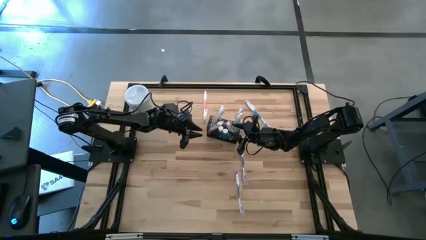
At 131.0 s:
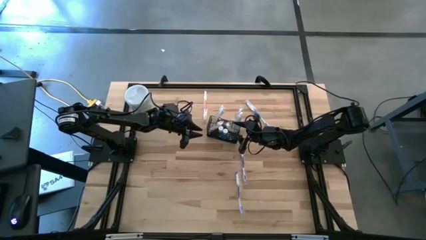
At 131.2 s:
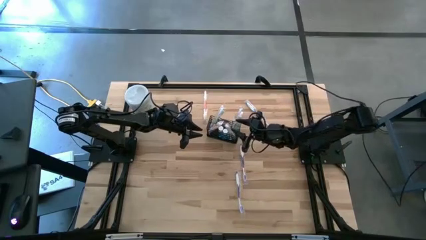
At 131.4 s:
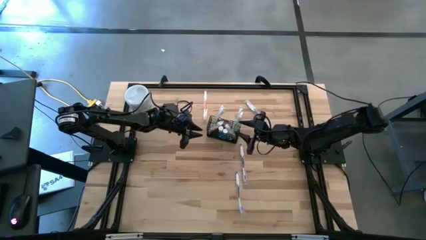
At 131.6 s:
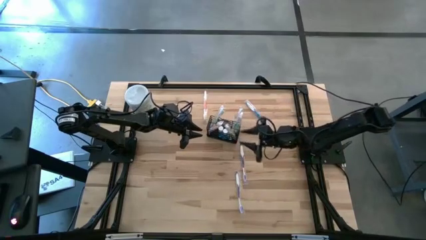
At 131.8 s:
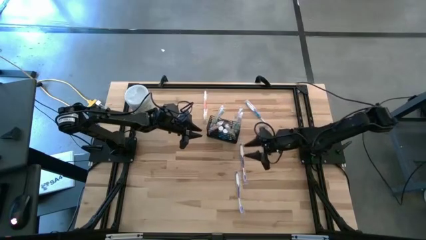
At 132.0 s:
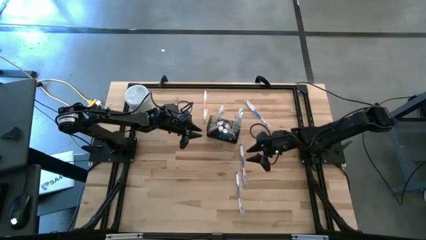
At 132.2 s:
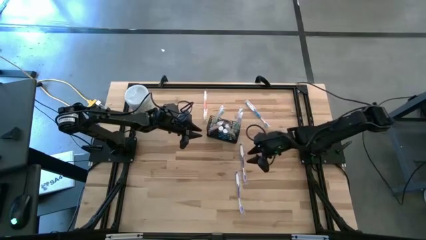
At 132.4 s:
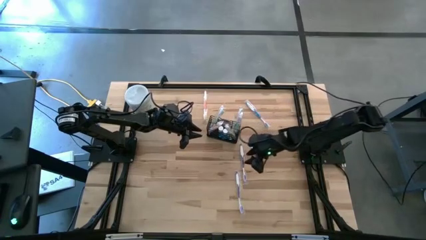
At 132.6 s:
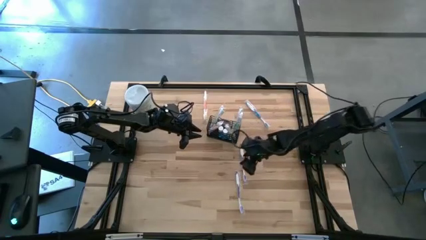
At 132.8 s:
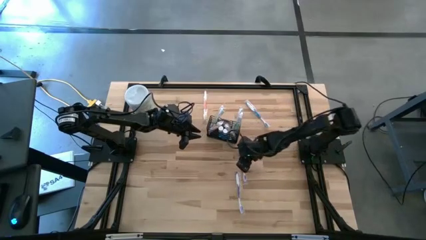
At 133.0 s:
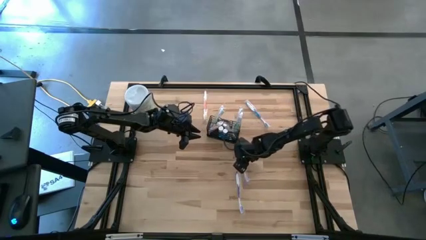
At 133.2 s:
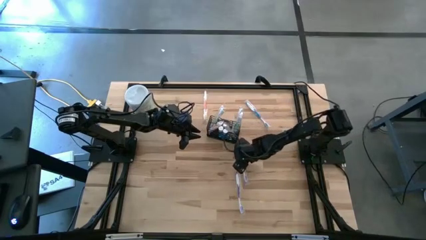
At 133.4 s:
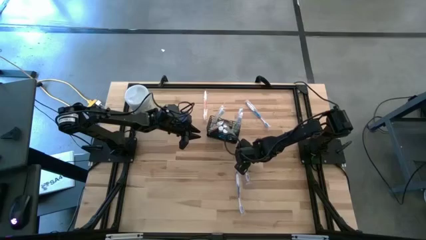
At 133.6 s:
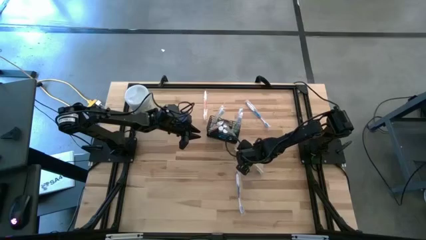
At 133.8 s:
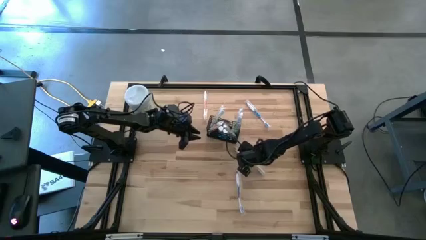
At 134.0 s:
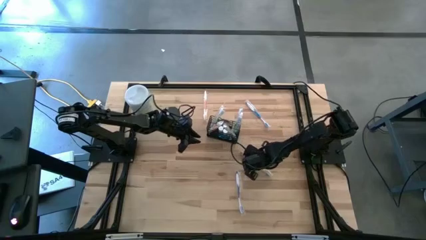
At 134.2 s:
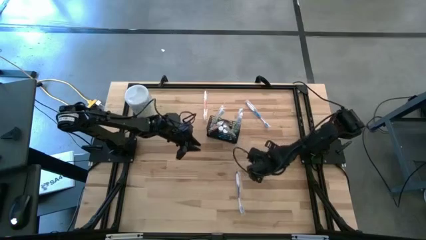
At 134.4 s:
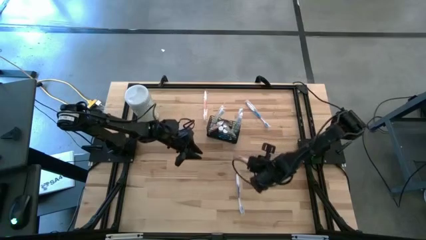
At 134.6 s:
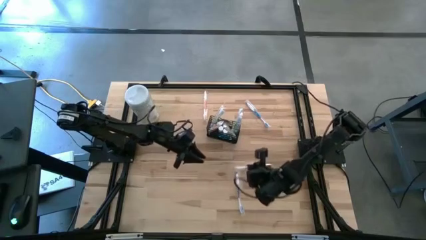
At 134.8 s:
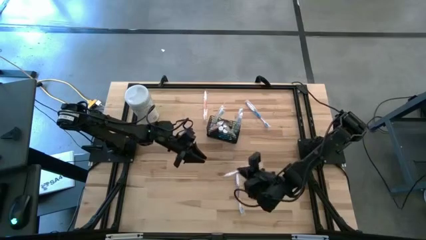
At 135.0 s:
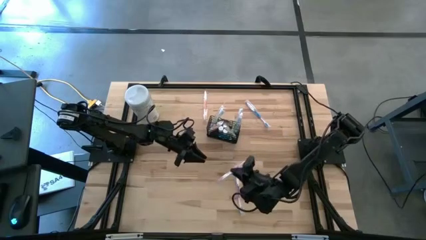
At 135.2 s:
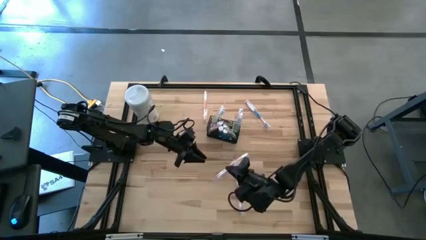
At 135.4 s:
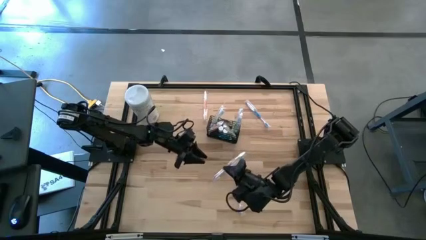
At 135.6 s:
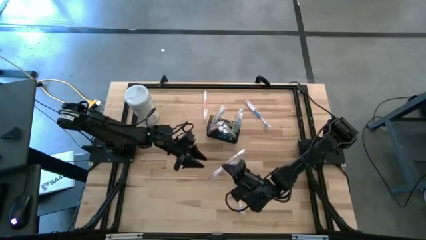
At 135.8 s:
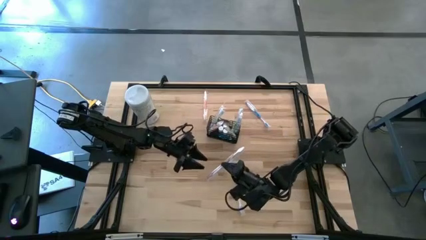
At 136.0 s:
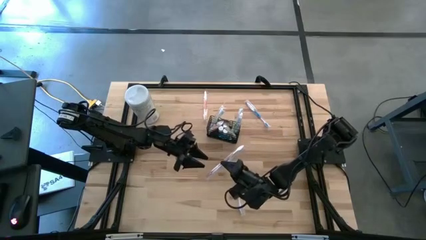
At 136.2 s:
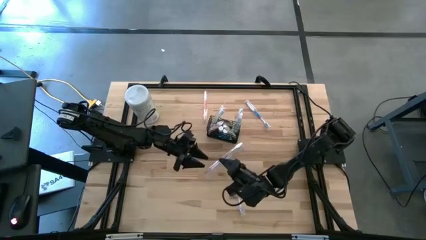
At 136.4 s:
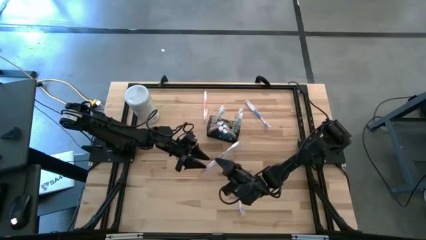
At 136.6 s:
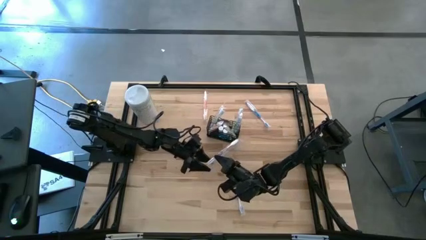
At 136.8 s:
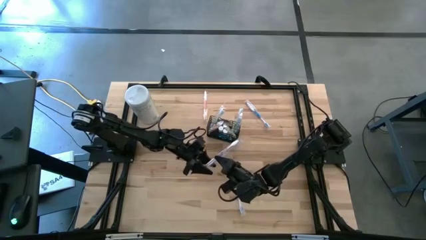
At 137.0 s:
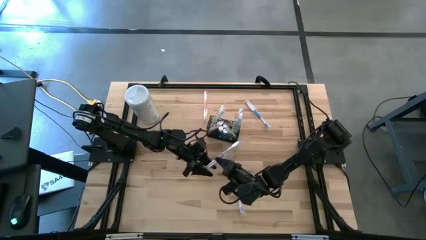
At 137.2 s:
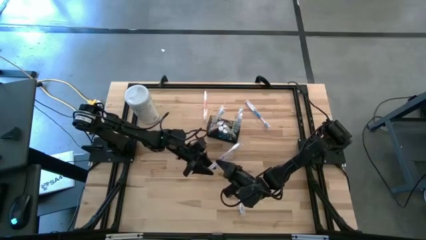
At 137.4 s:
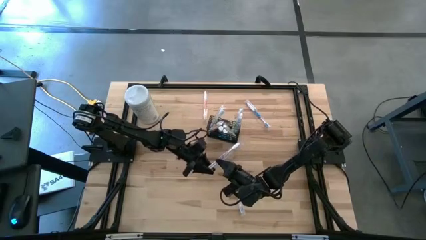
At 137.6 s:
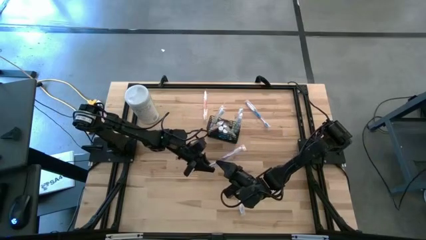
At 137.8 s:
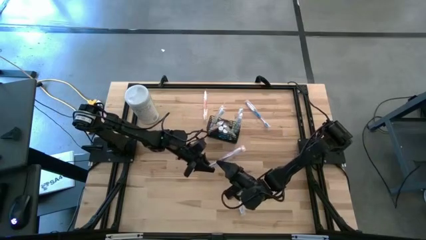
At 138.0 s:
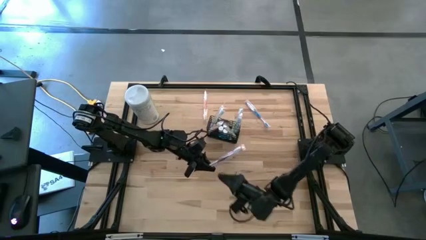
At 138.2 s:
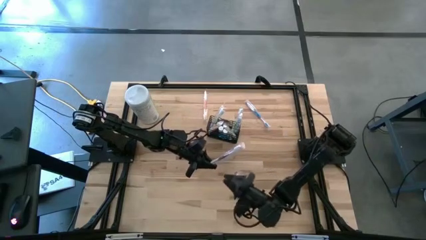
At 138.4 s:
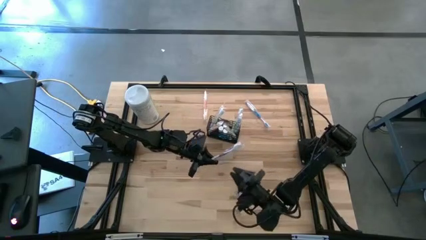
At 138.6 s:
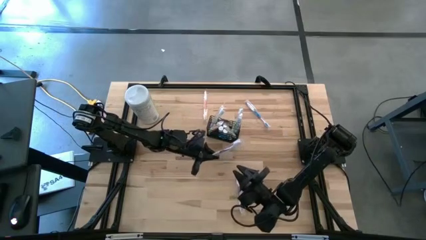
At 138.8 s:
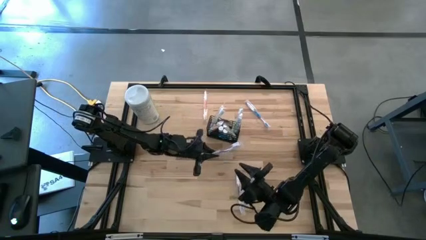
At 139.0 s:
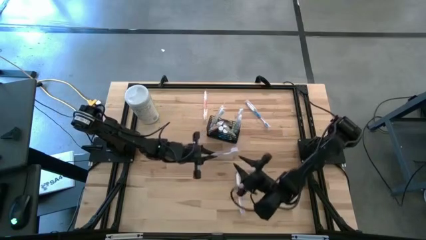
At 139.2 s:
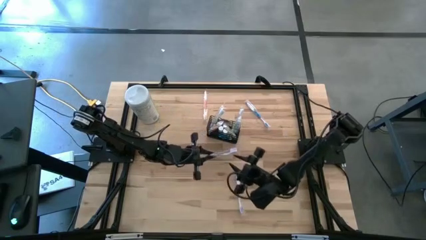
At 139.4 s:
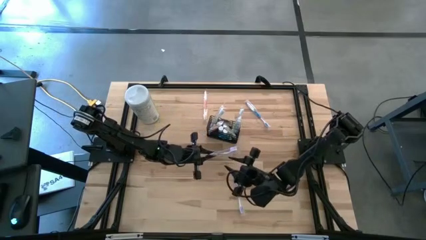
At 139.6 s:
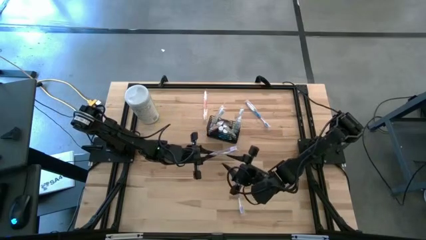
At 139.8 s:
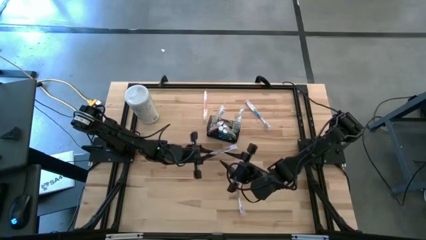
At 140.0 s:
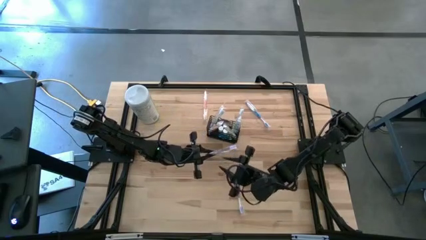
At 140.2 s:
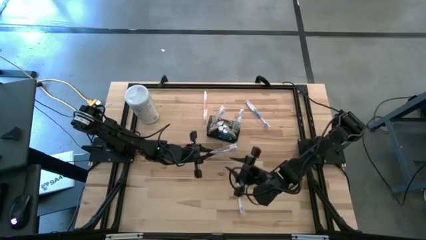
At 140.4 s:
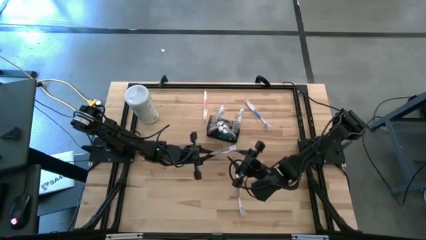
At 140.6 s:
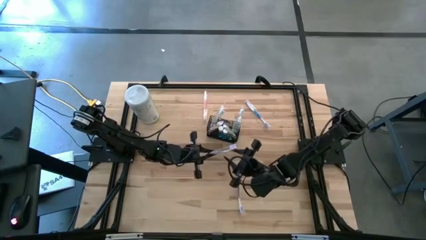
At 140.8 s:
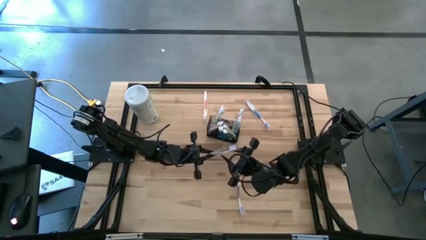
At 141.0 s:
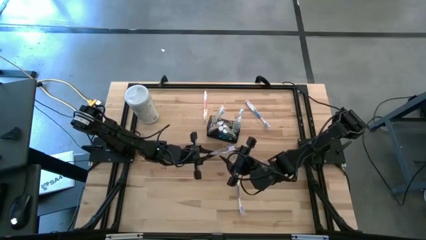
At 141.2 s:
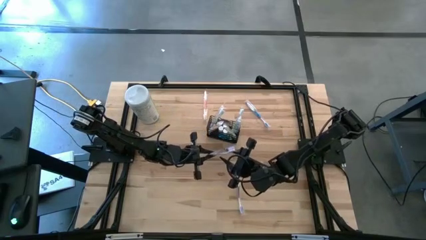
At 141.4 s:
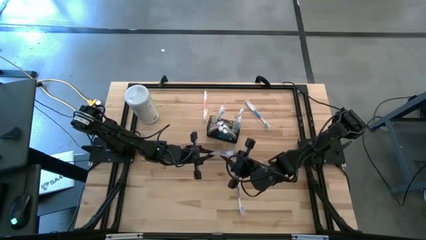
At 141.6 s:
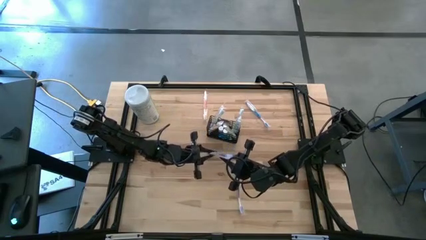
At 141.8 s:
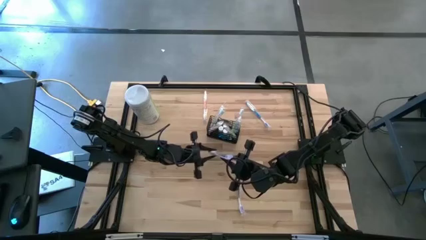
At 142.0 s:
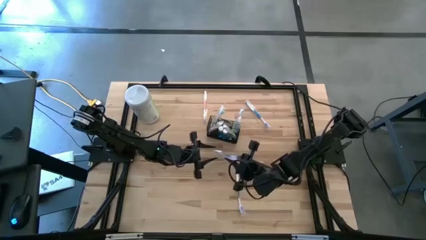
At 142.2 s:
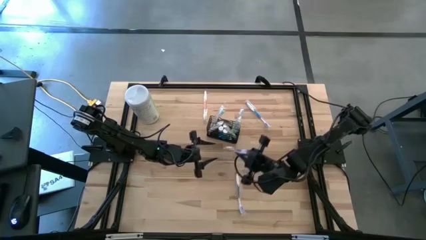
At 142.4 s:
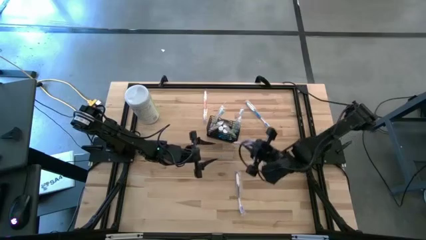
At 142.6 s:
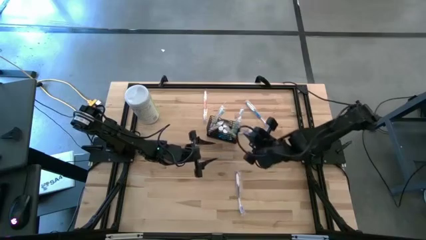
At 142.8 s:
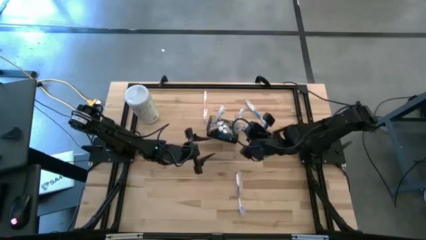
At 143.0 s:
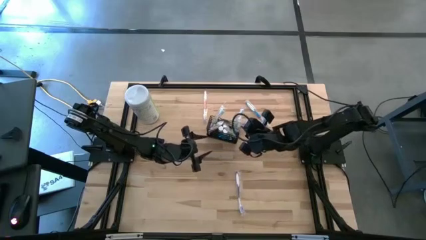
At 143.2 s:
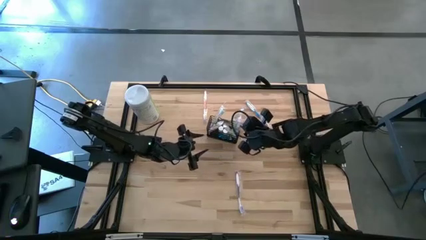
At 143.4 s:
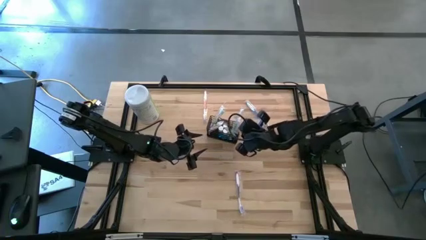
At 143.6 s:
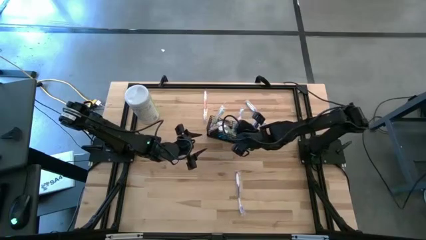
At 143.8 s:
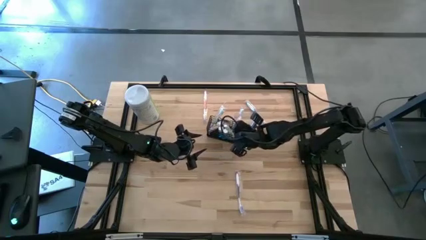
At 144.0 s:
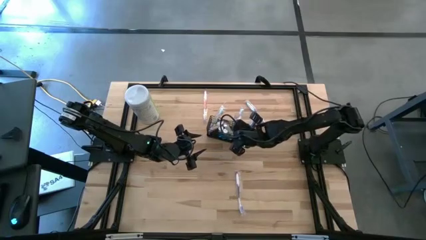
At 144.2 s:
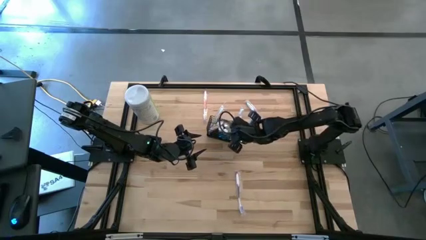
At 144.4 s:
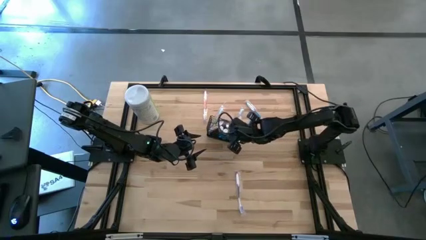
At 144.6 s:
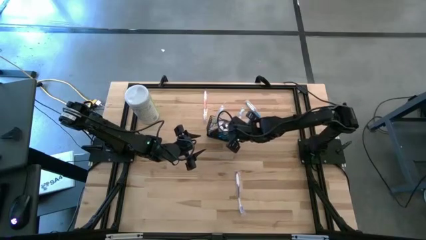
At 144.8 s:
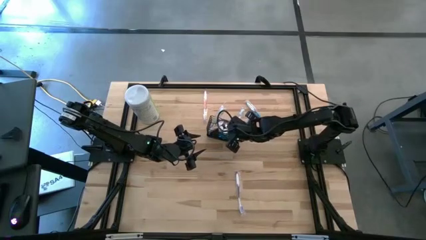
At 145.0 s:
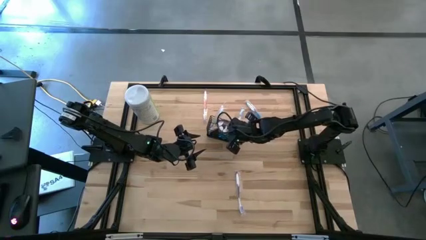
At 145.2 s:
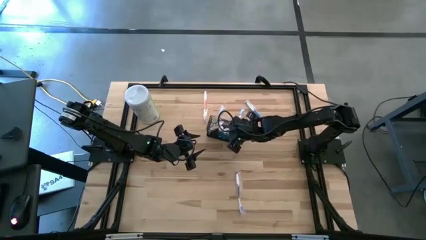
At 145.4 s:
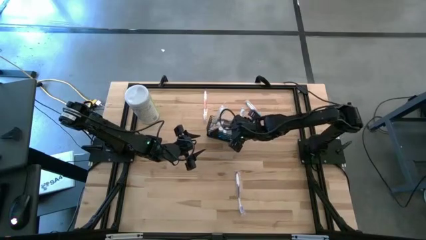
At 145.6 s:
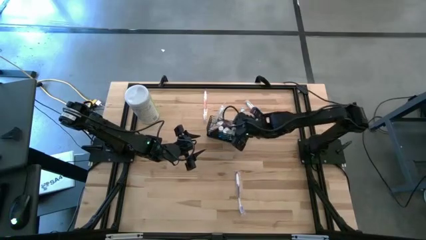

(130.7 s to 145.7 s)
Task: Pick & Place toothbrushing station
Put the top violet toothbrush into the mesh organizer

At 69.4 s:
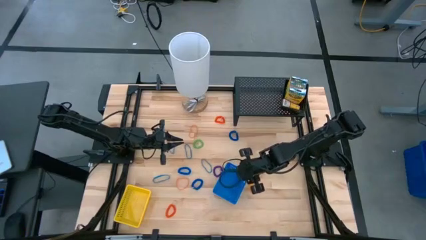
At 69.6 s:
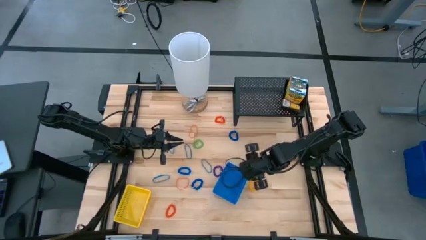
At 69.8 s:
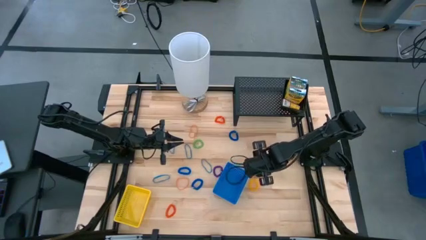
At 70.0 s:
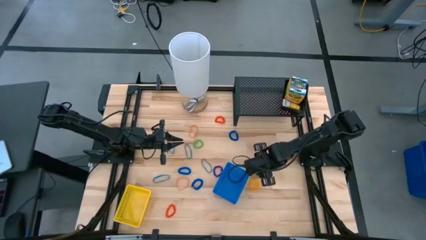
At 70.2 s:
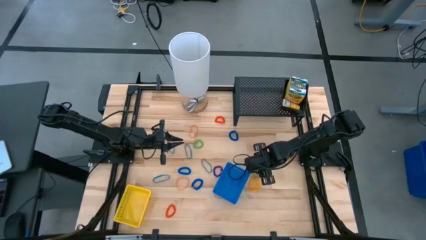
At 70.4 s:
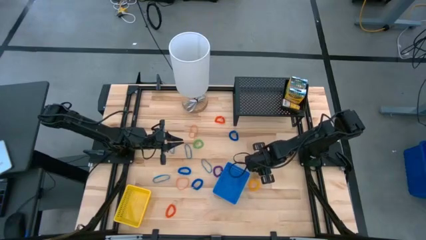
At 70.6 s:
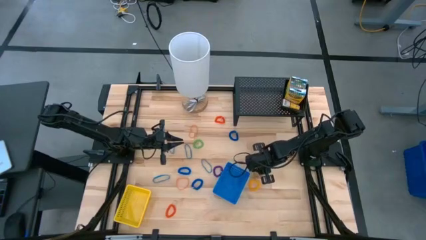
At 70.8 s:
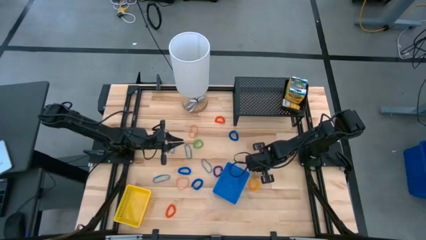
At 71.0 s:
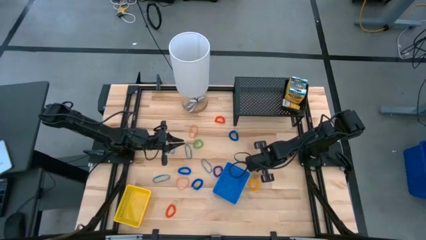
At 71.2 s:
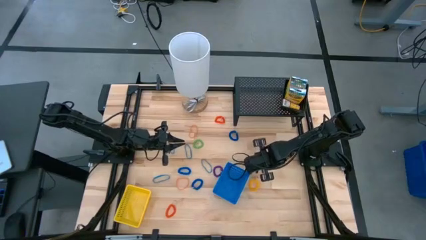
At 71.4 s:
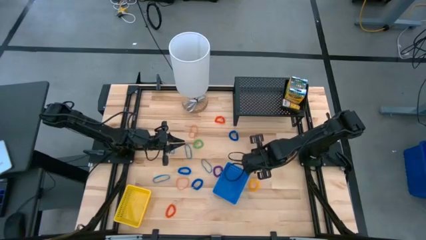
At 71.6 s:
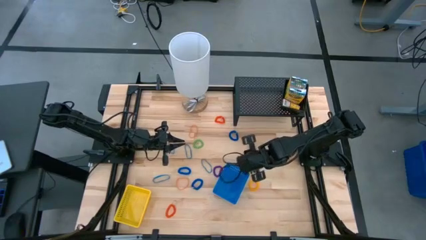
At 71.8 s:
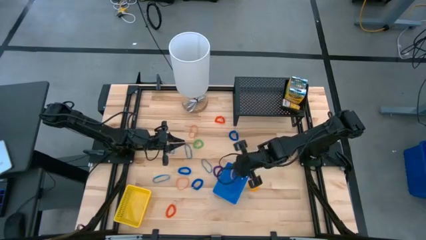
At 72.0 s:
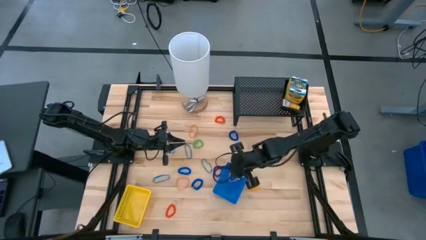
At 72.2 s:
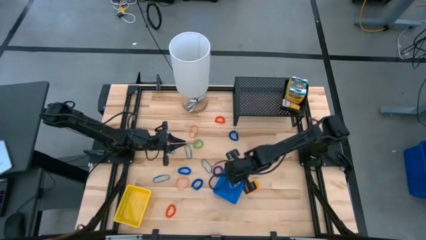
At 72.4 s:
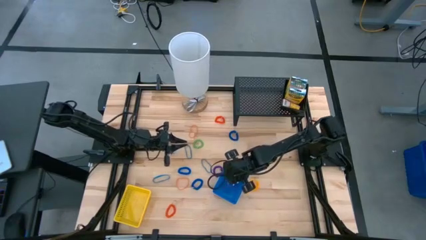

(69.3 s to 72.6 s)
Task: Pick & Place Office Desk Supplies
Put the orange rubber band into the blue bin
